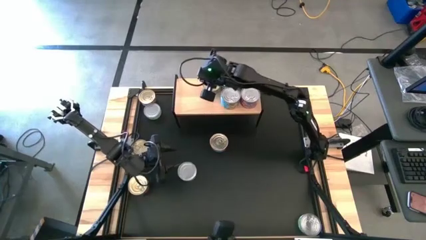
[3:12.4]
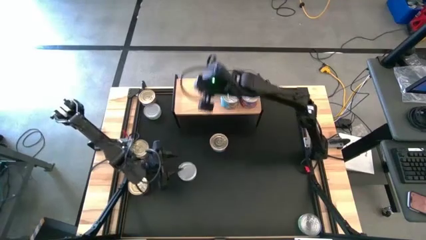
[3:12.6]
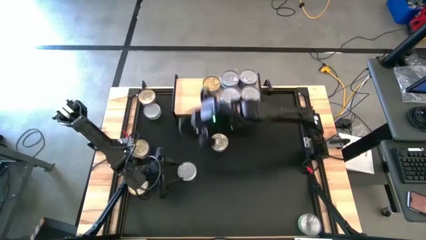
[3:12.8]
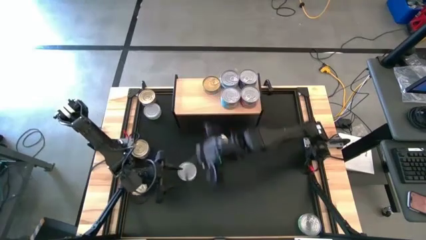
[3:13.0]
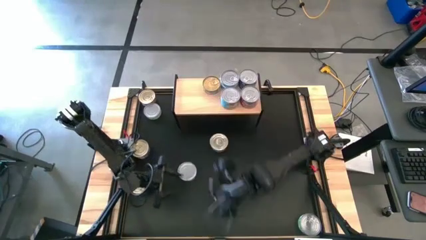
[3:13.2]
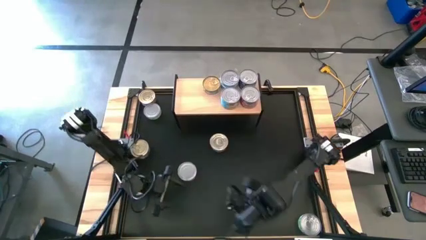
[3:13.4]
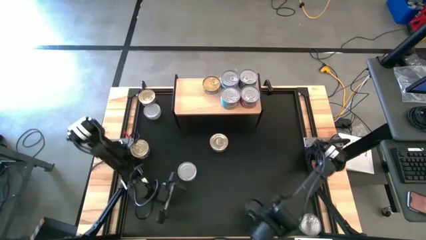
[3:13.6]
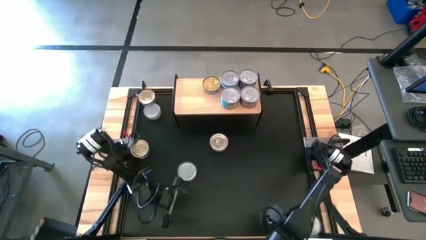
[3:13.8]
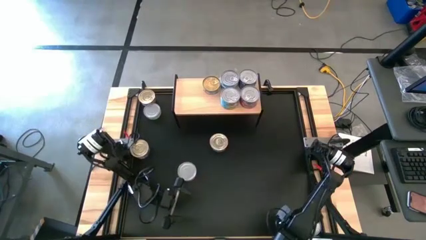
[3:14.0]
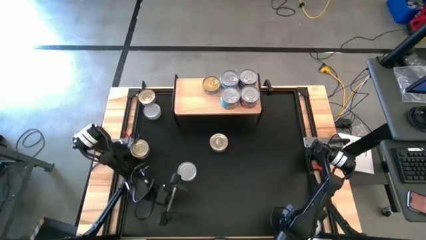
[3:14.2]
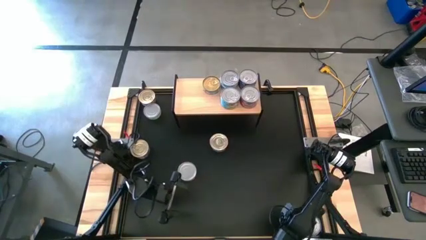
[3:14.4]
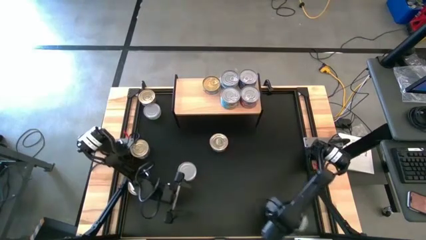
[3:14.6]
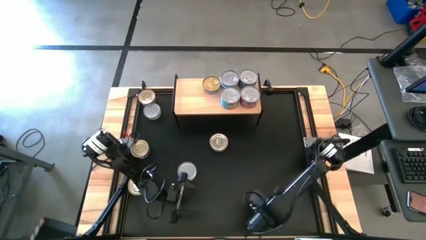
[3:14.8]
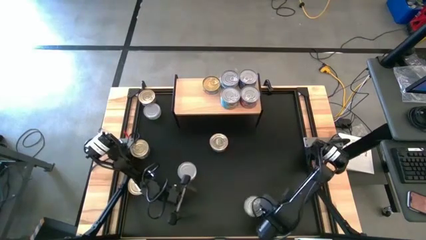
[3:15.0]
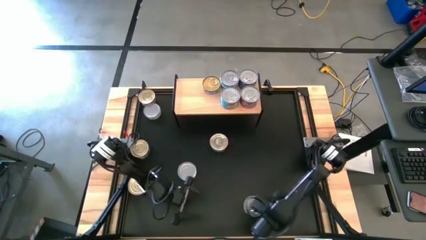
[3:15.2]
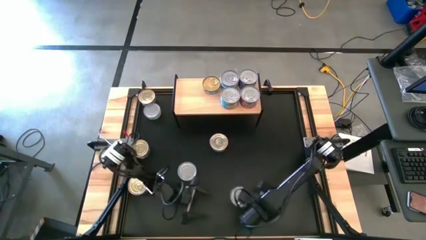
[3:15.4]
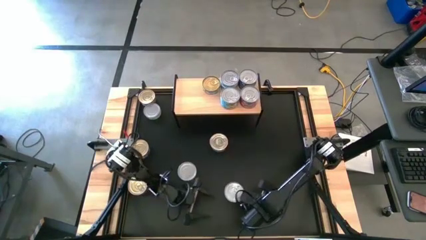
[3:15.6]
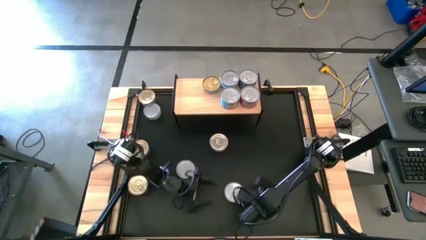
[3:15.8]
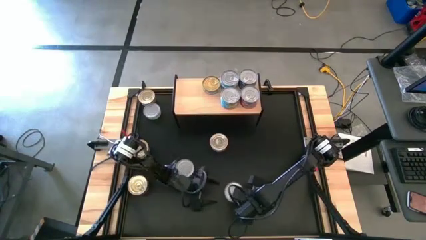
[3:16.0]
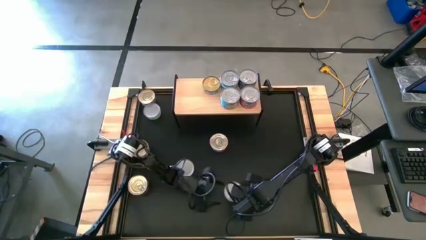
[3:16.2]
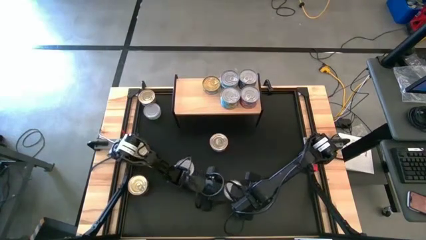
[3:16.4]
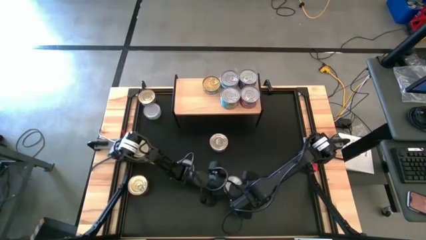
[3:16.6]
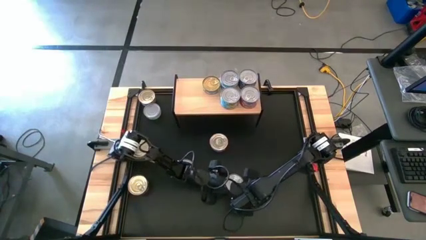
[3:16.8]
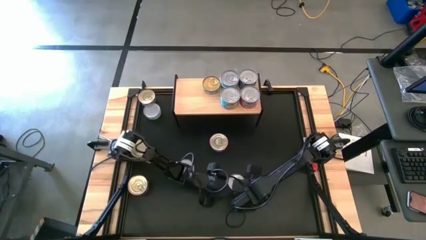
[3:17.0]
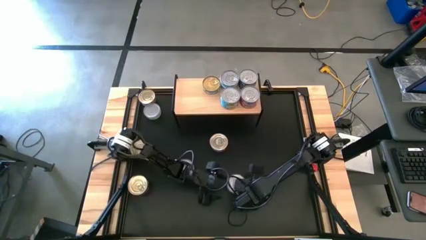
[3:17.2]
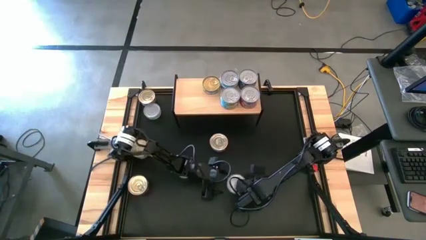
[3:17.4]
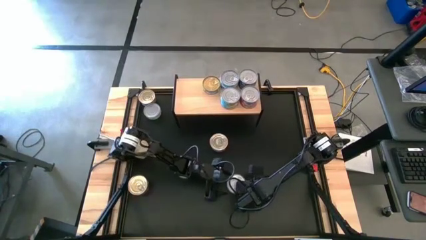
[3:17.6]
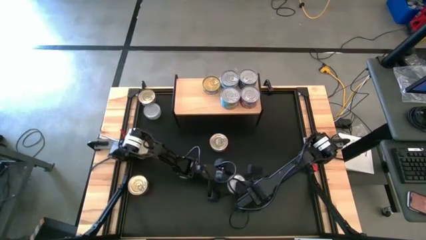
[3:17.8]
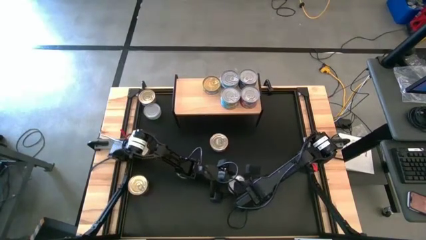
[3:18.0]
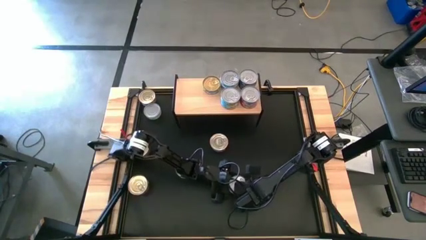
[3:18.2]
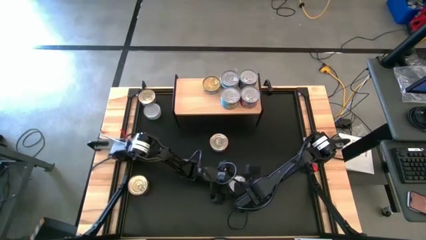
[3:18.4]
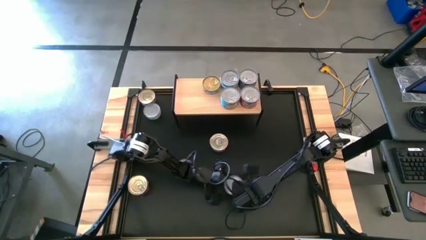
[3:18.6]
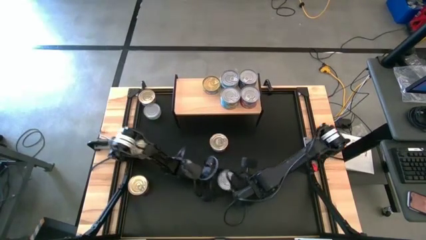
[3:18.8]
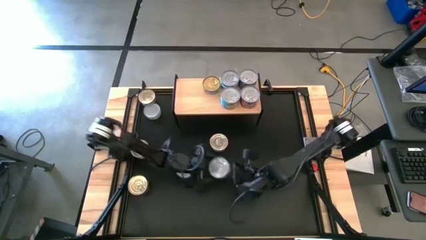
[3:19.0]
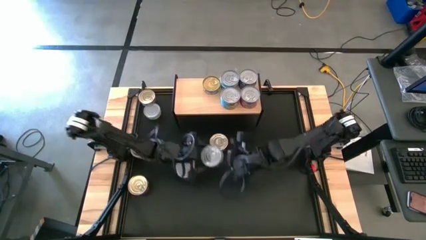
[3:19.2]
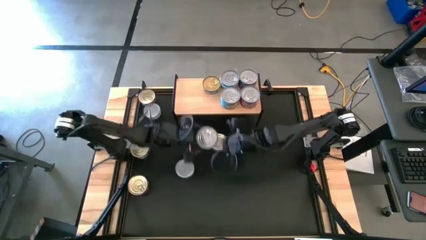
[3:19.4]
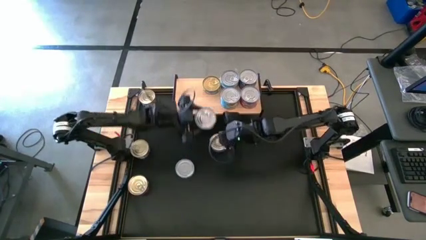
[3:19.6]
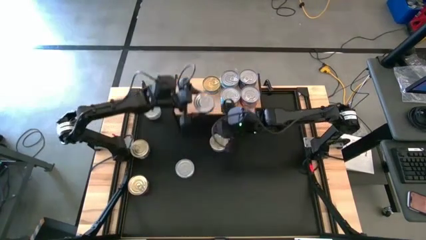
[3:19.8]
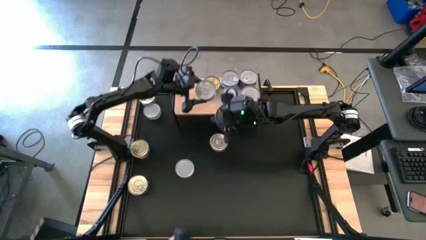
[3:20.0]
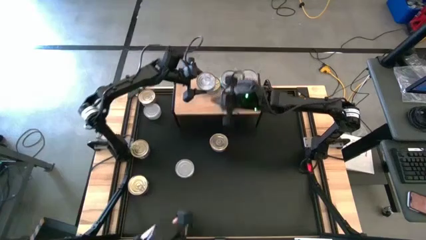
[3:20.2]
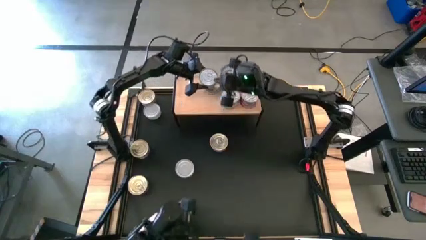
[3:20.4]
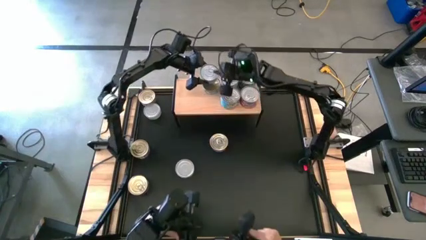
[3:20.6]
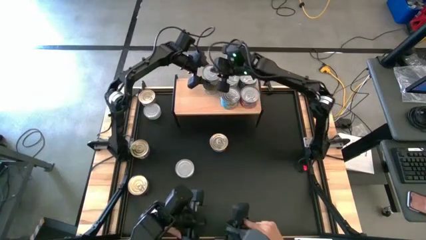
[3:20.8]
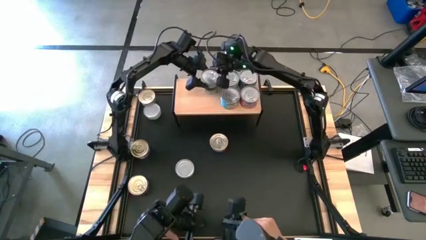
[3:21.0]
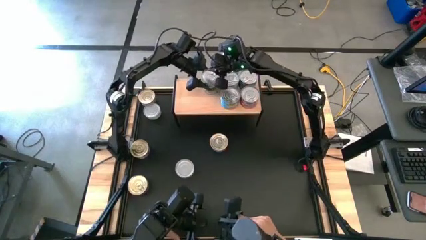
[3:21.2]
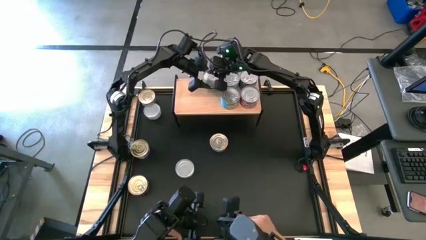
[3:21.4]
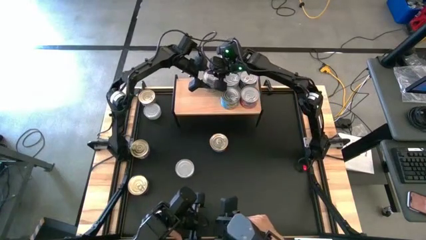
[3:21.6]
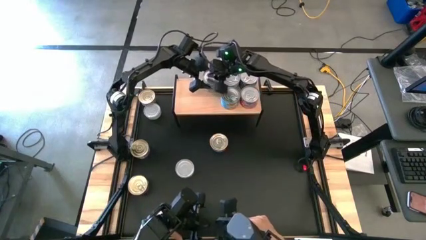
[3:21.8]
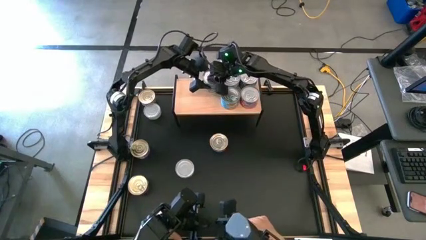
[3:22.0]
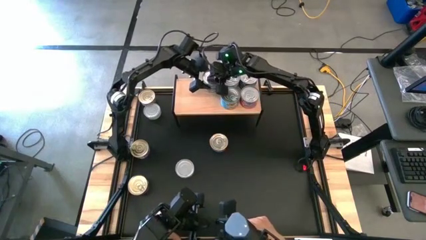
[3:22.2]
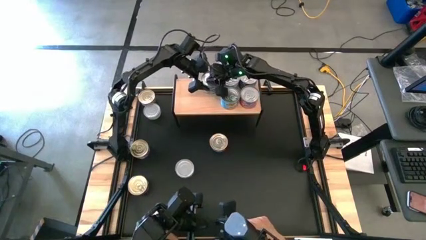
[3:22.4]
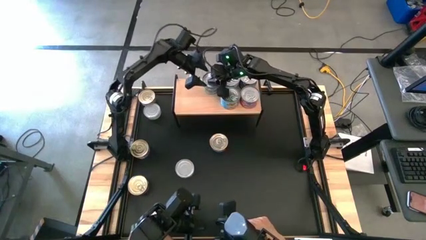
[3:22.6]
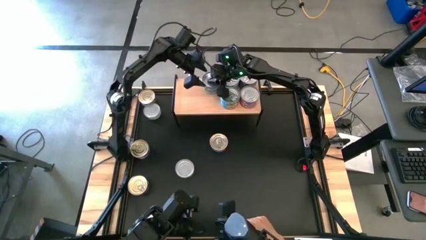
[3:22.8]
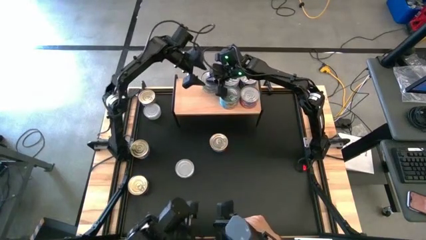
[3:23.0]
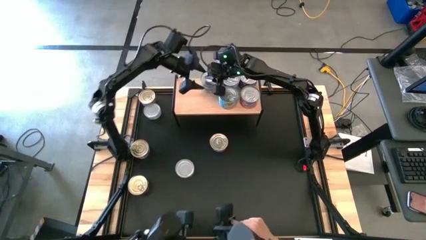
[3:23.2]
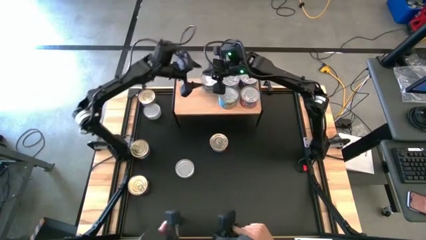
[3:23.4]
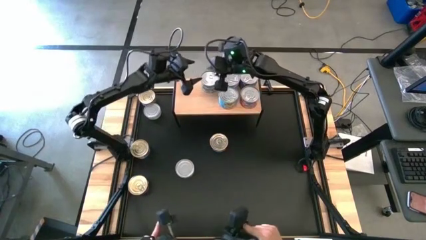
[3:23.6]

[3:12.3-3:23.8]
Task: Stack canned seafood by type on shelf
Stack the green tuna can on top of the other green tuna can on the shelf
